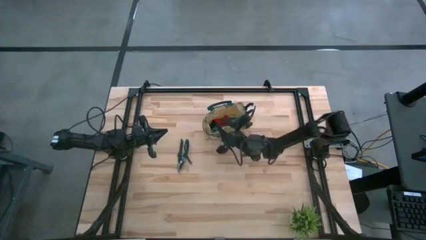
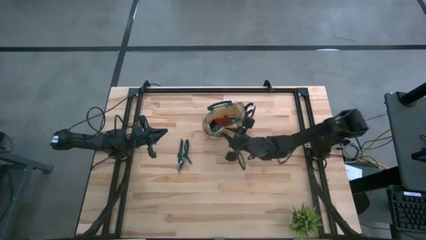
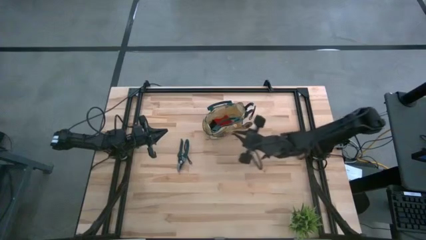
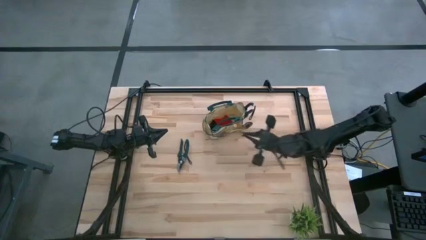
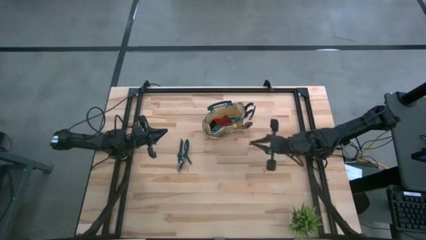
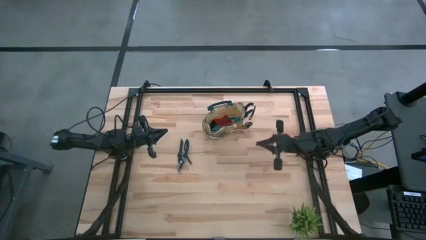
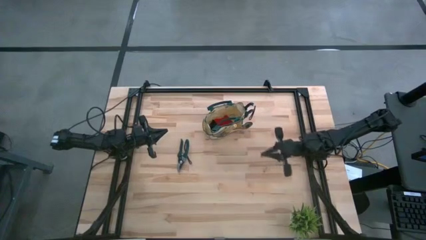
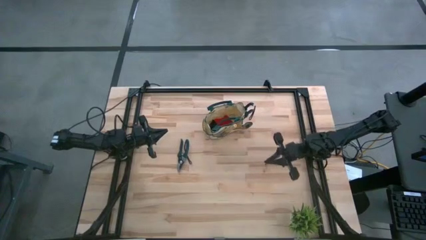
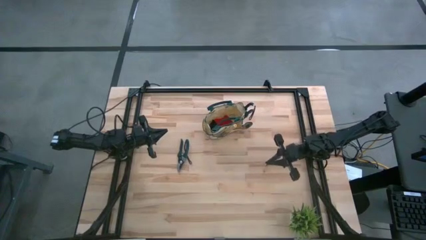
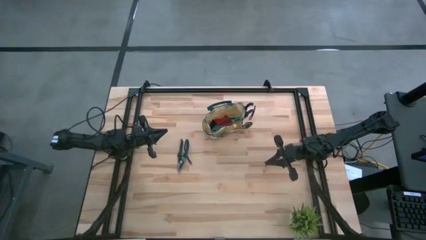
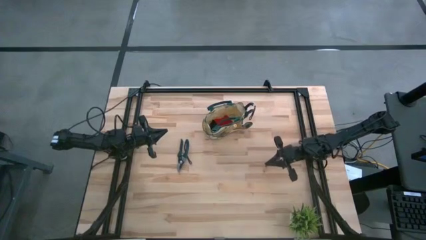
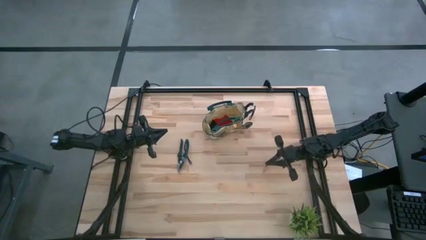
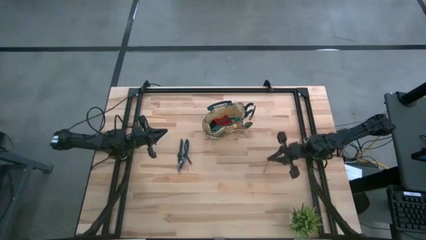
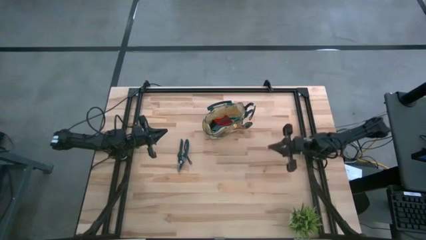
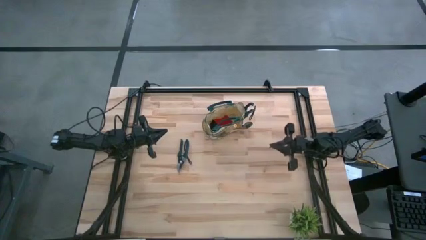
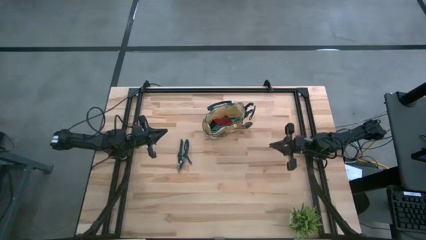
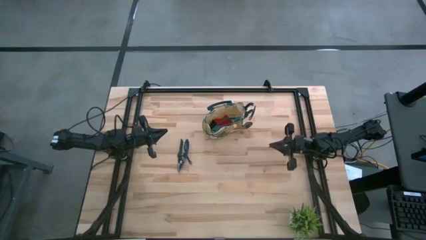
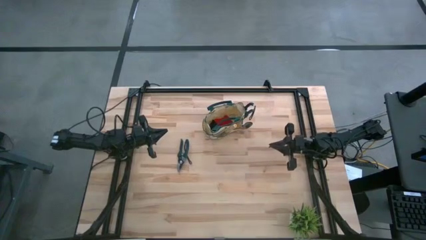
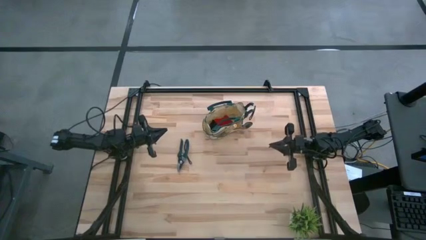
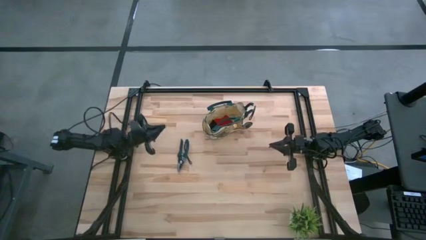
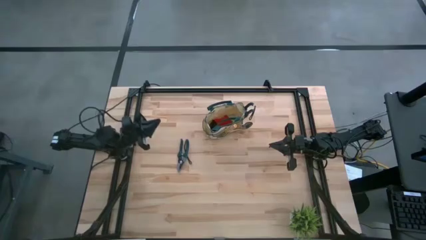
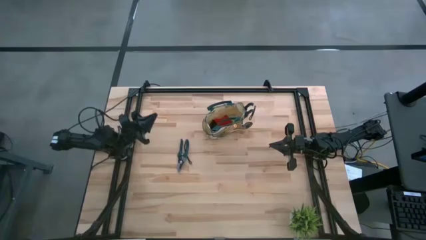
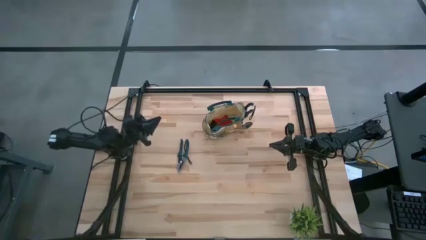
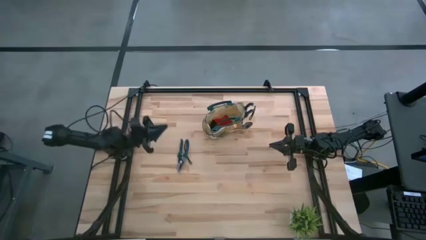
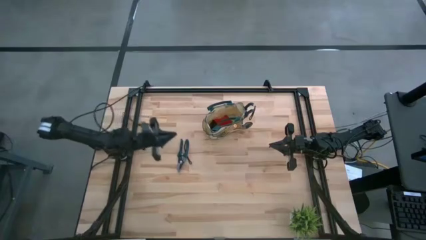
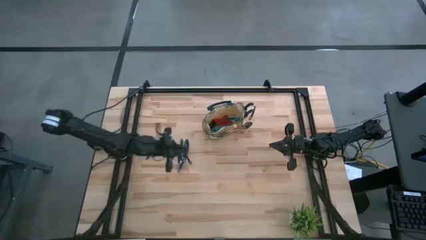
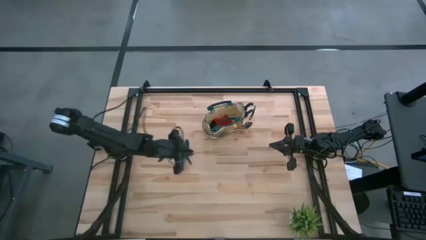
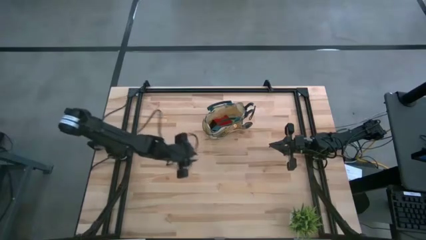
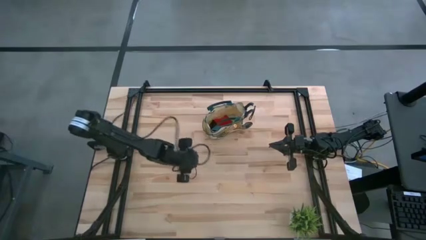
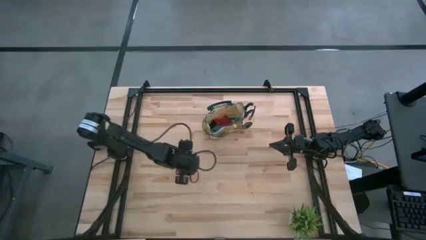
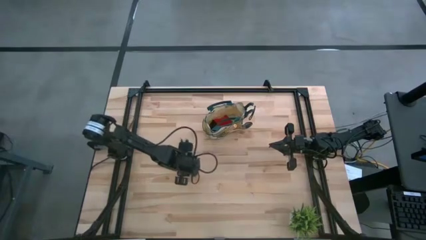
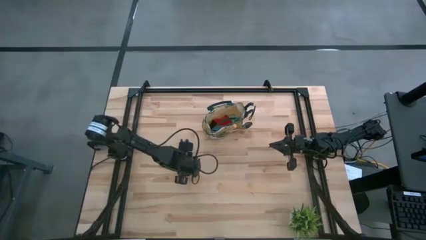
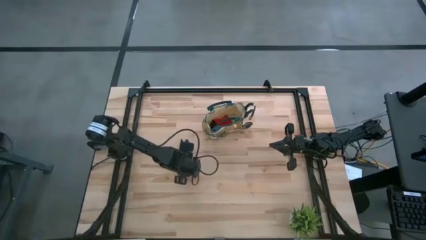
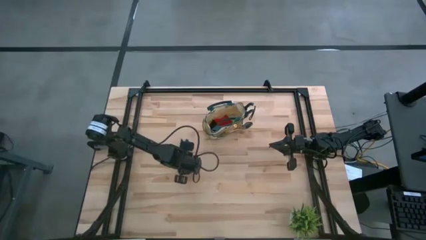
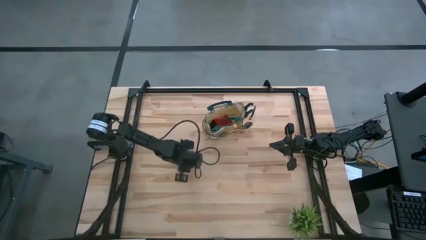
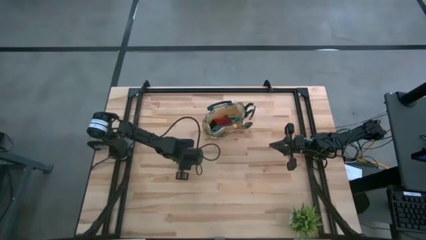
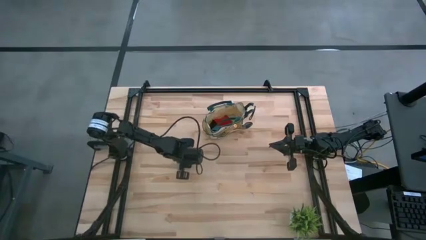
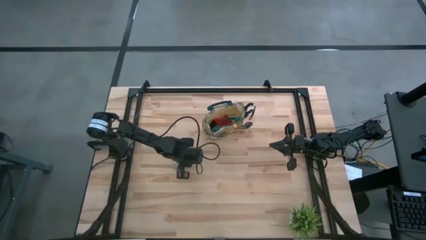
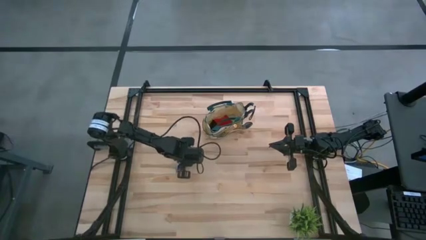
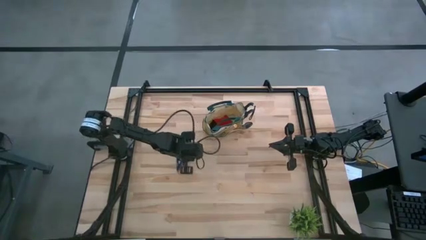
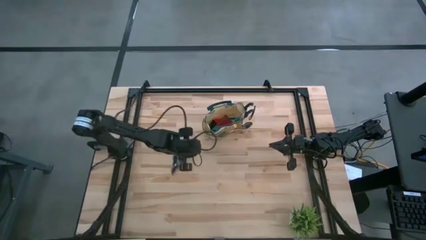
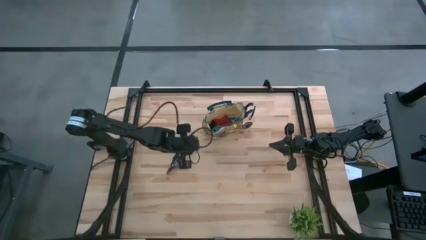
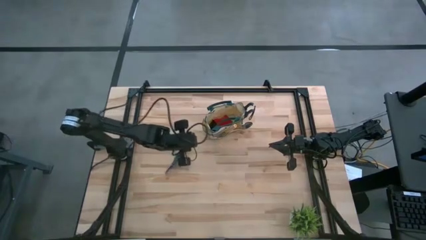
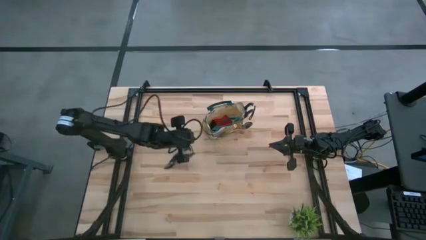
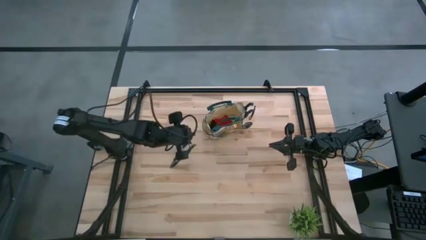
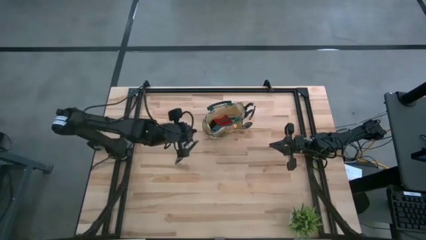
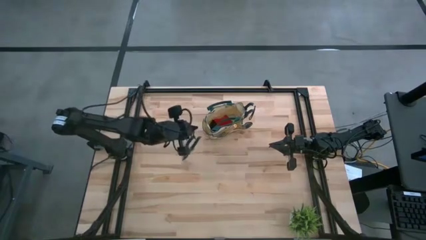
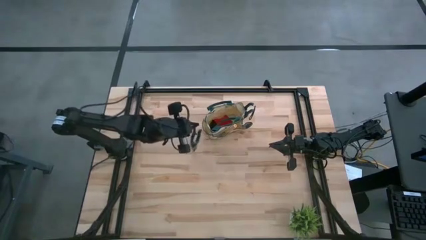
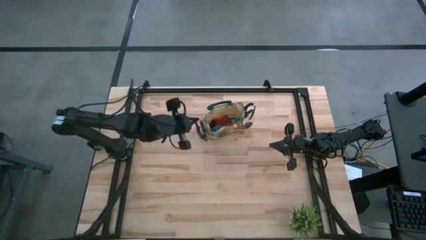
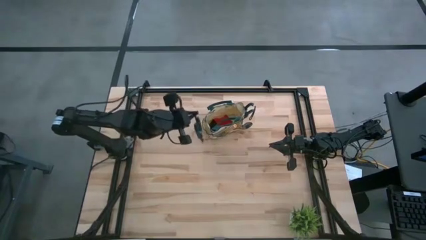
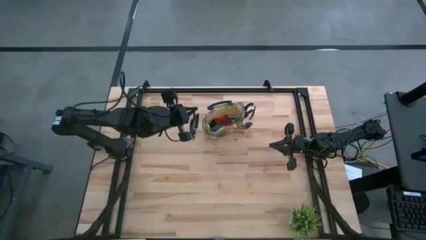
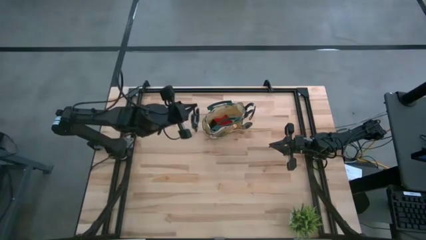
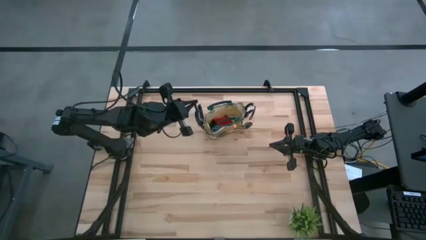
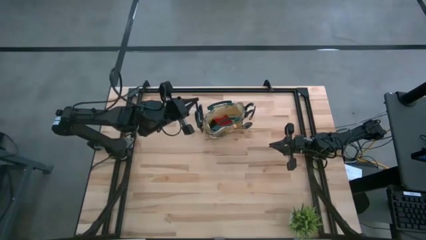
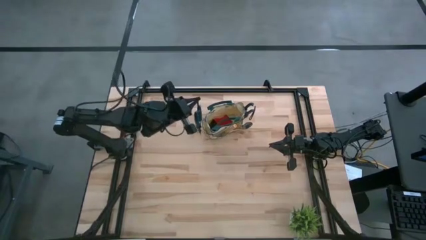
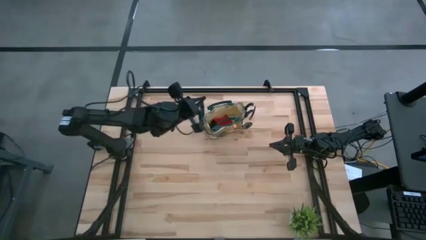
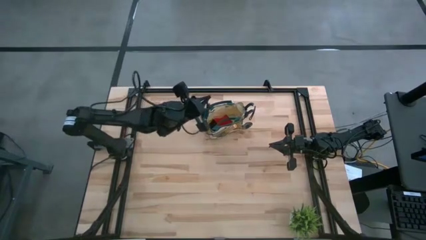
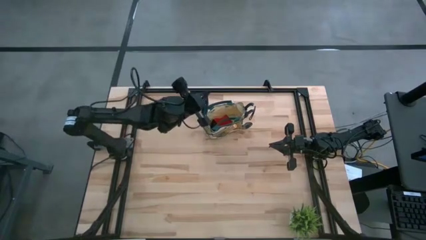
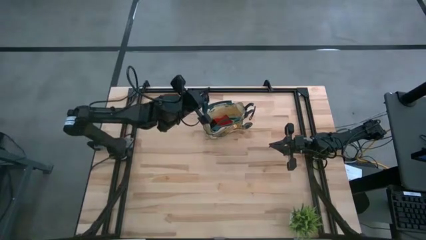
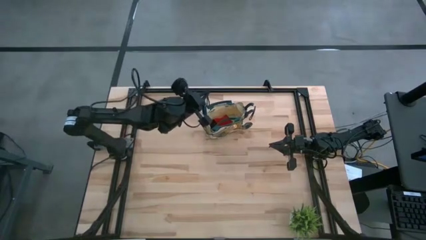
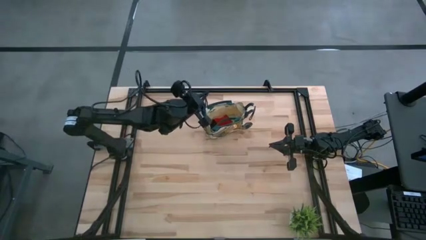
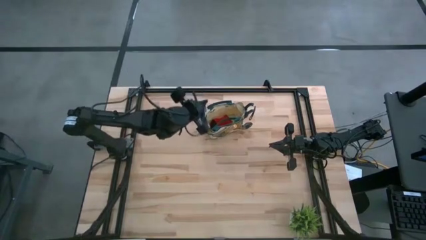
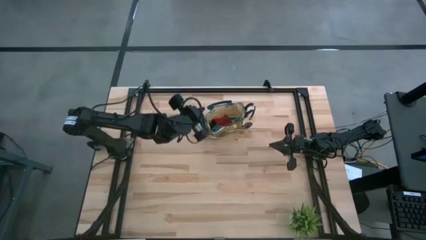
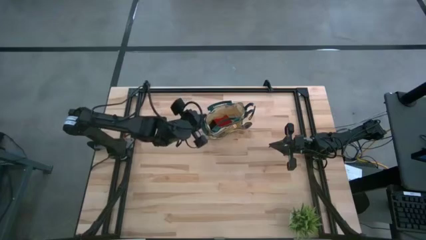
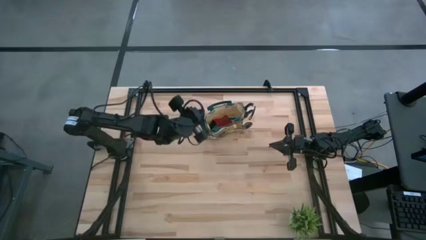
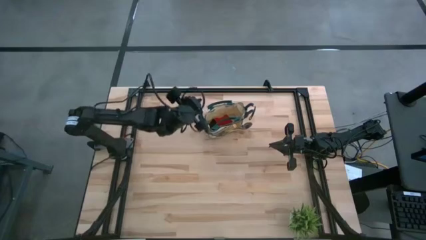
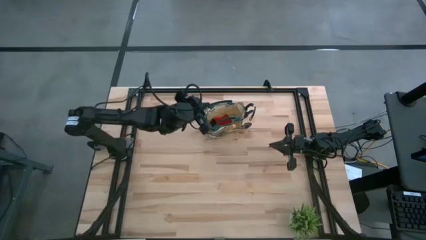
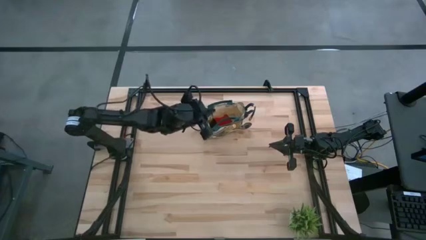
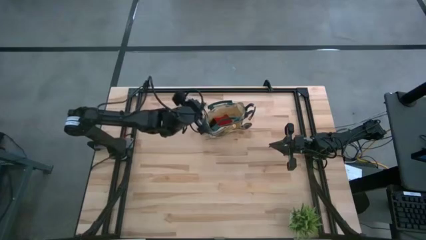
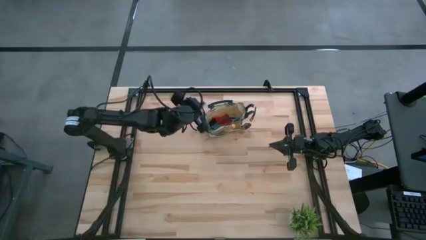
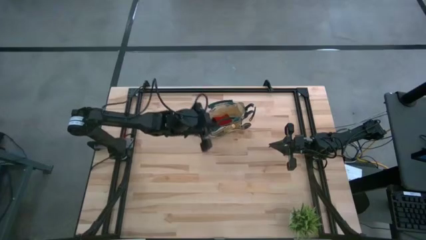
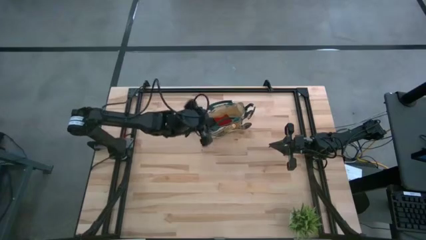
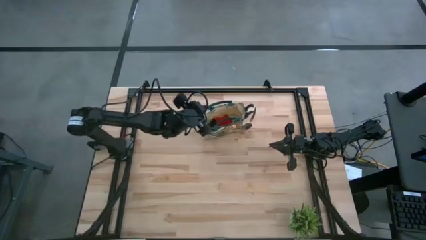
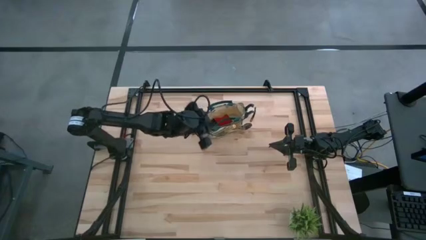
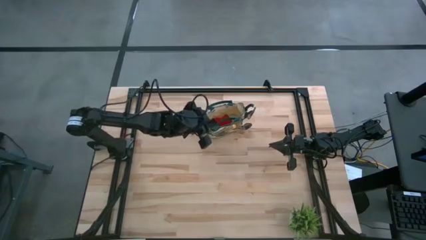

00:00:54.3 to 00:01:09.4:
Task: Pick & Place Garden tools in Gardening bag
Put the shear scissors into the gardening bag

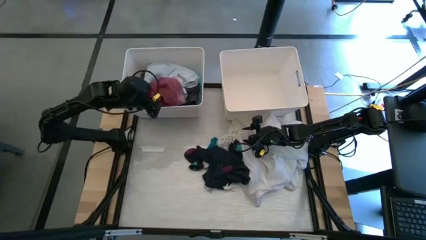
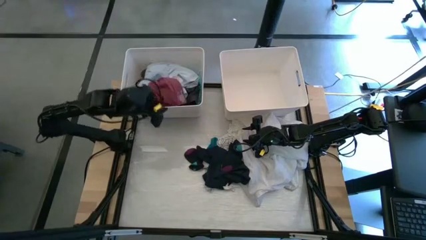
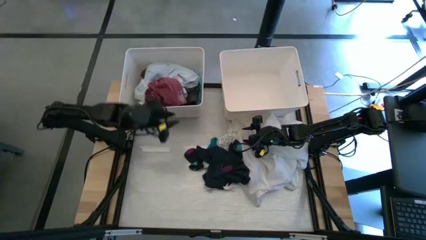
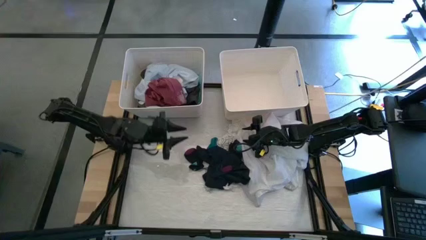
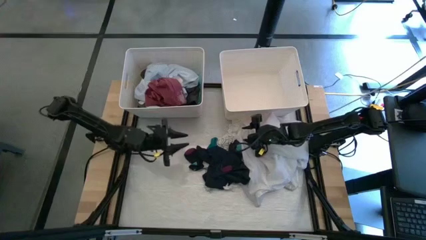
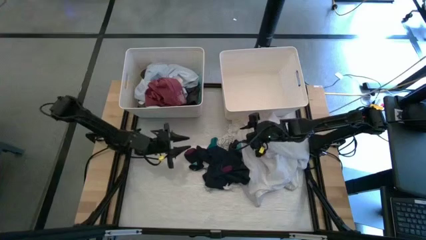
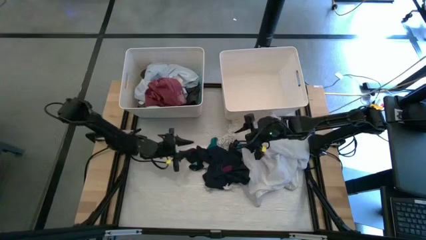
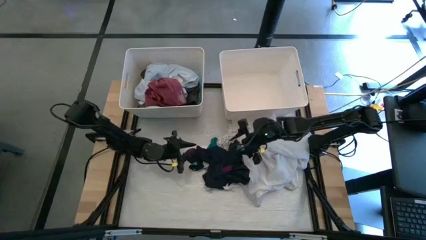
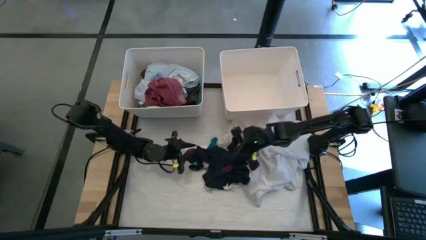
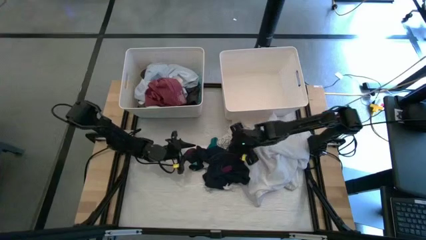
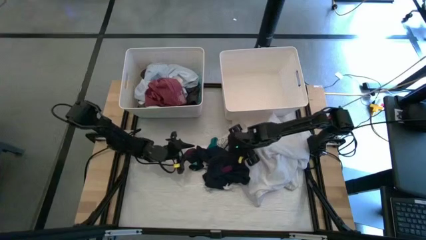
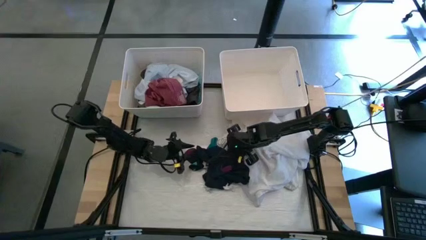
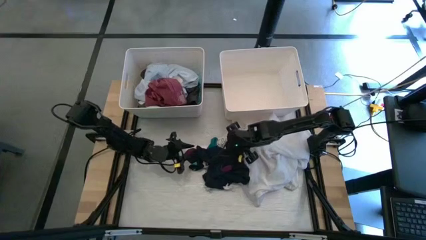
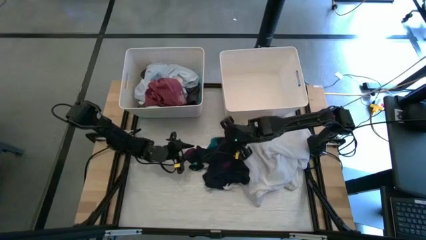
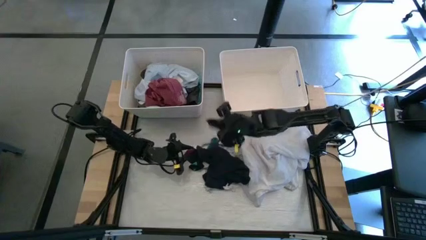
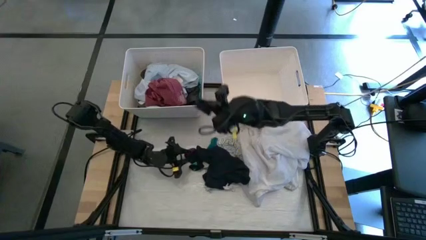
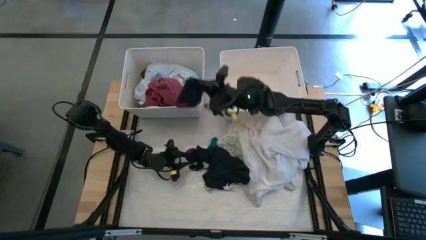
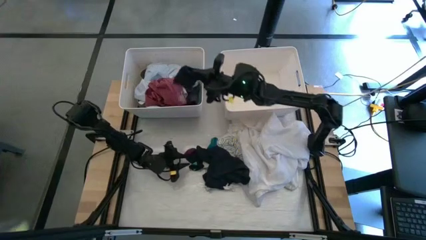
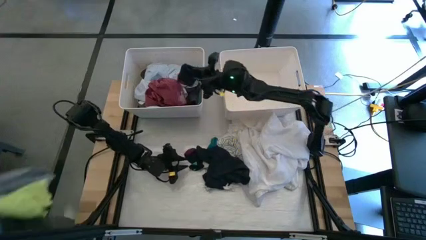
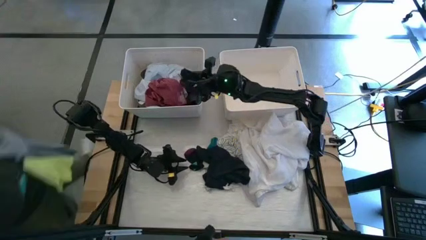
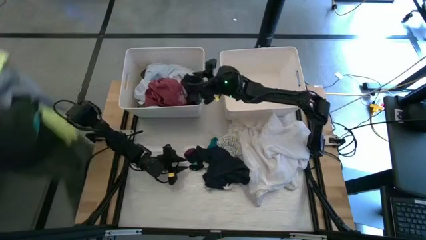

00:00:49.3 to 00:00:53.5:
Task: Sort clothes
Put the black sock into the left white laundry bin
